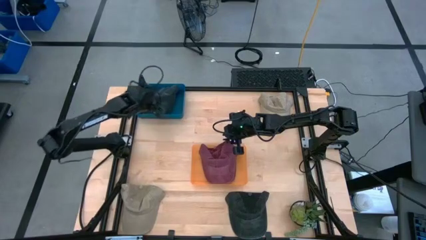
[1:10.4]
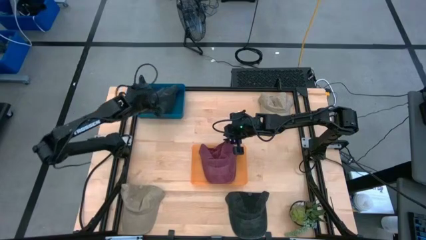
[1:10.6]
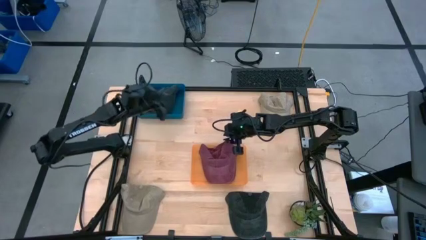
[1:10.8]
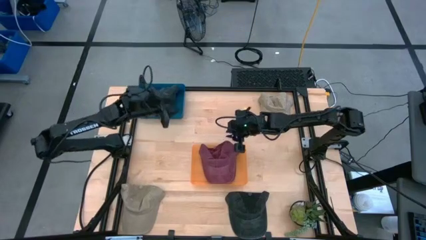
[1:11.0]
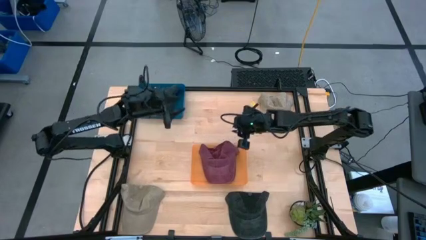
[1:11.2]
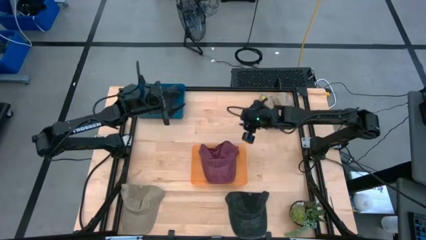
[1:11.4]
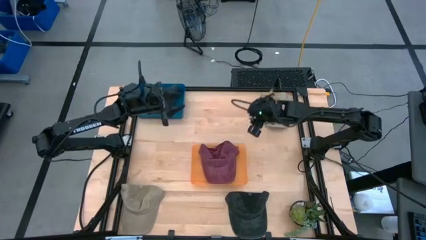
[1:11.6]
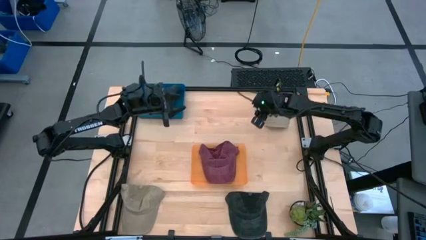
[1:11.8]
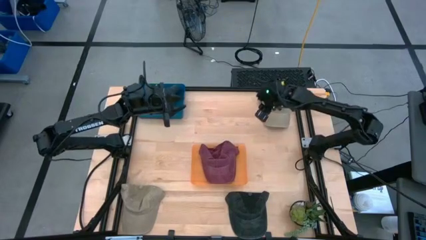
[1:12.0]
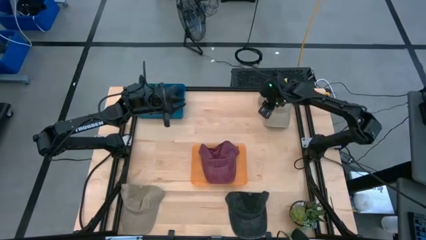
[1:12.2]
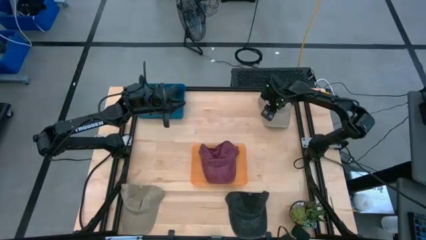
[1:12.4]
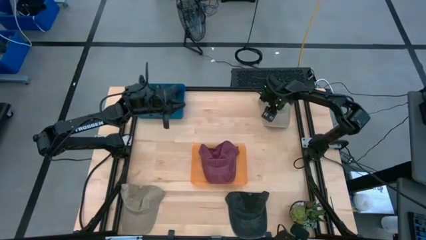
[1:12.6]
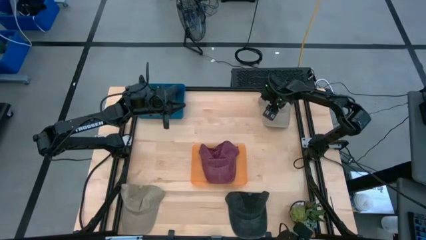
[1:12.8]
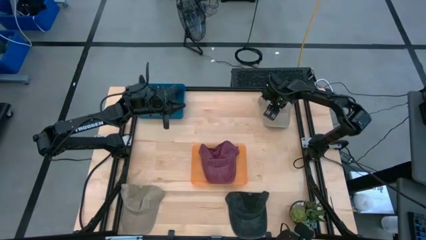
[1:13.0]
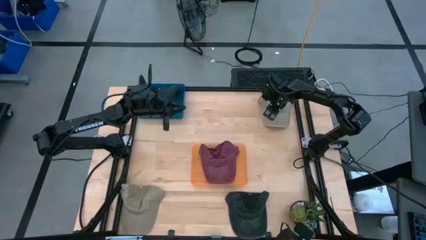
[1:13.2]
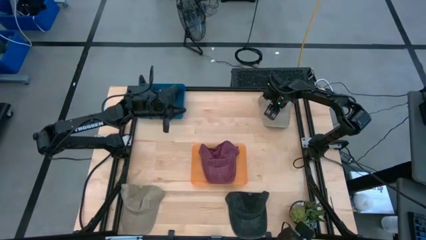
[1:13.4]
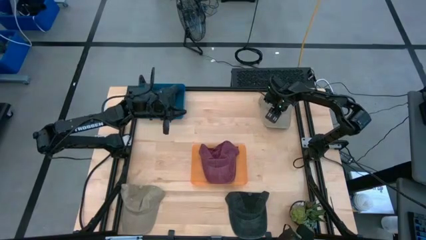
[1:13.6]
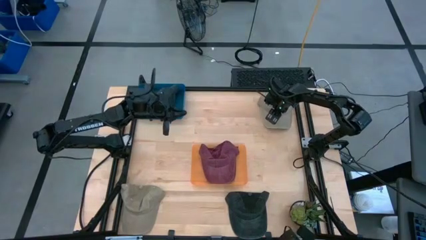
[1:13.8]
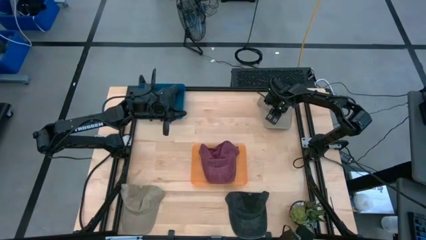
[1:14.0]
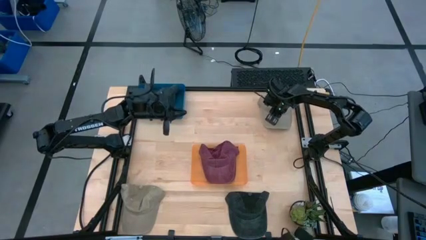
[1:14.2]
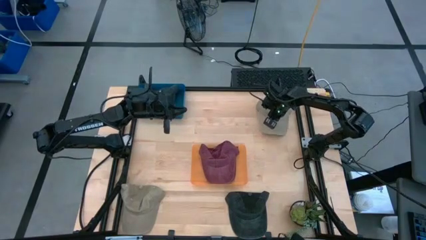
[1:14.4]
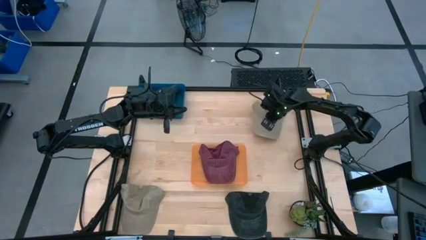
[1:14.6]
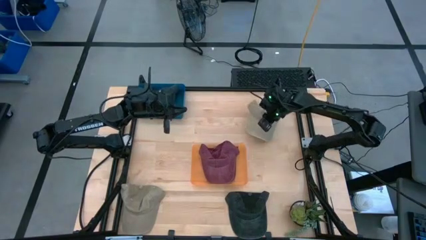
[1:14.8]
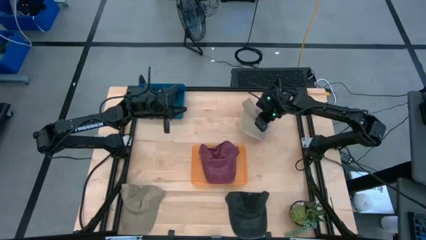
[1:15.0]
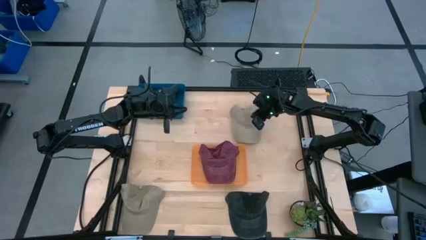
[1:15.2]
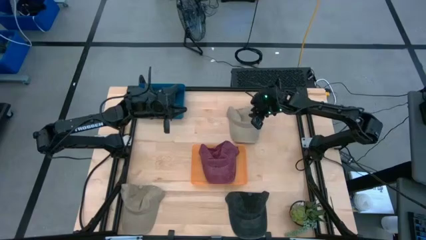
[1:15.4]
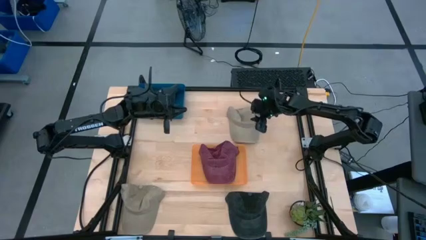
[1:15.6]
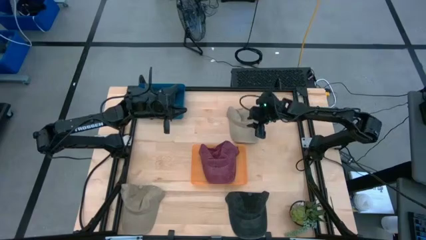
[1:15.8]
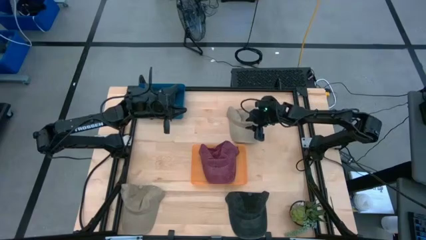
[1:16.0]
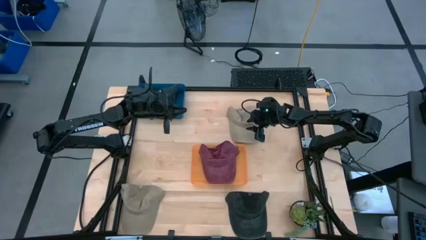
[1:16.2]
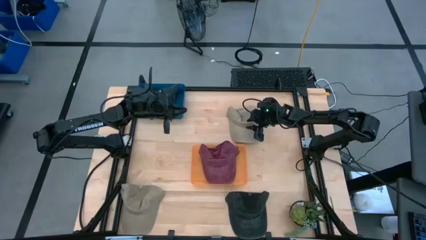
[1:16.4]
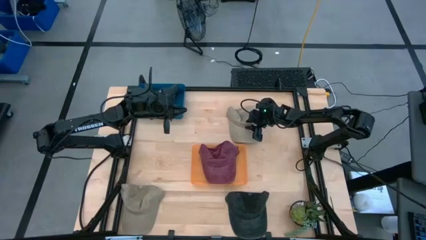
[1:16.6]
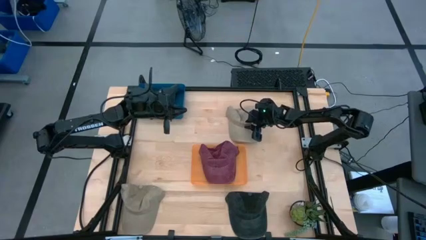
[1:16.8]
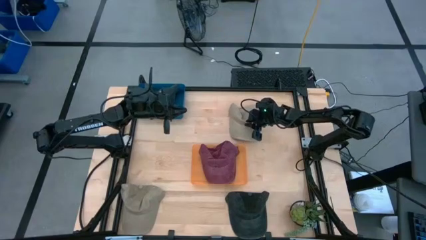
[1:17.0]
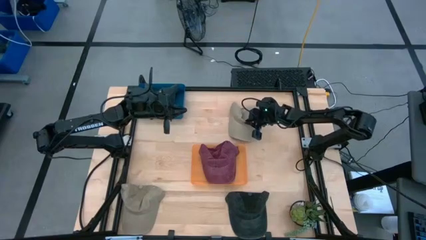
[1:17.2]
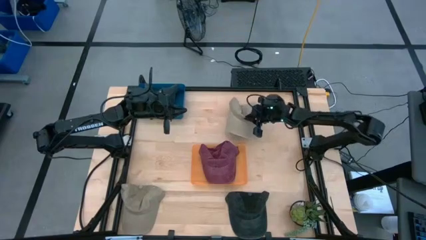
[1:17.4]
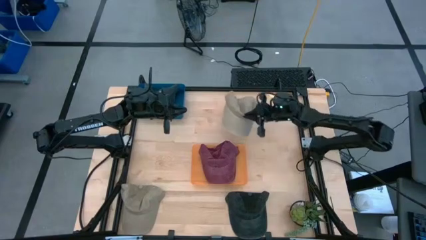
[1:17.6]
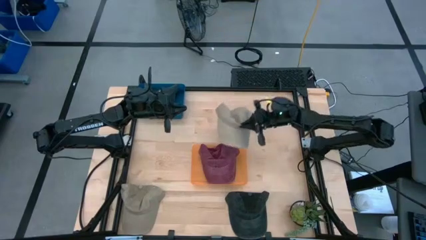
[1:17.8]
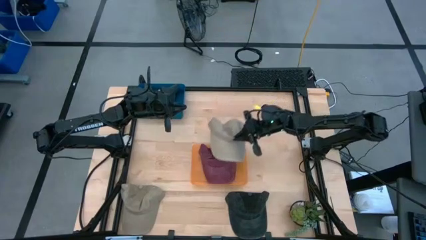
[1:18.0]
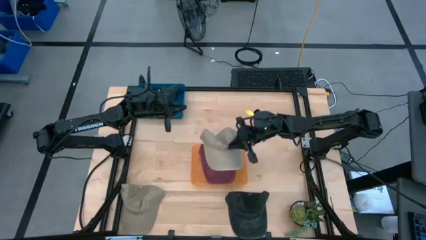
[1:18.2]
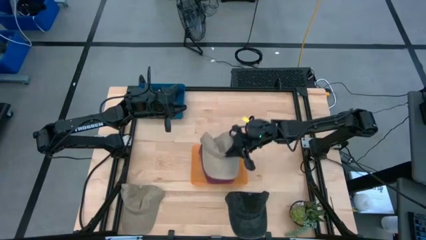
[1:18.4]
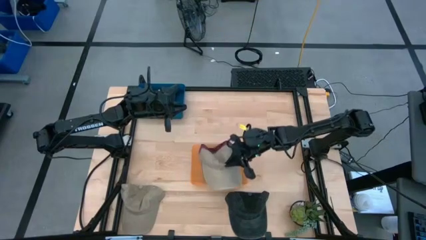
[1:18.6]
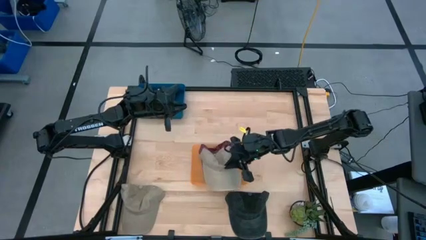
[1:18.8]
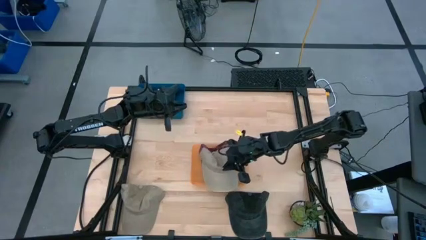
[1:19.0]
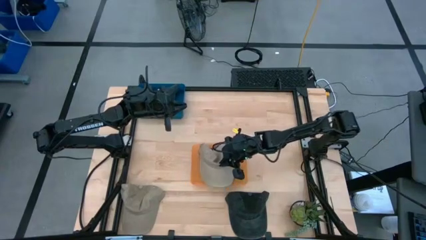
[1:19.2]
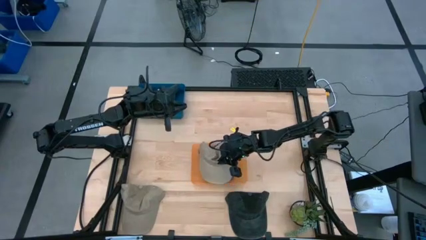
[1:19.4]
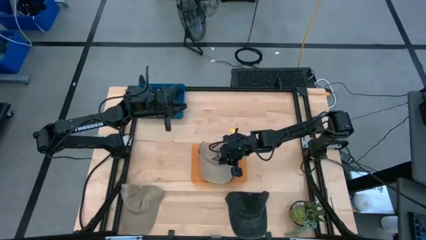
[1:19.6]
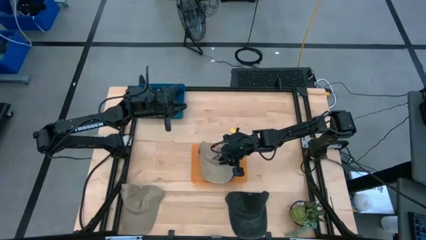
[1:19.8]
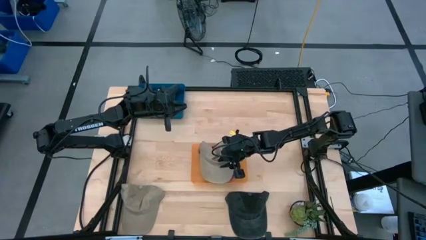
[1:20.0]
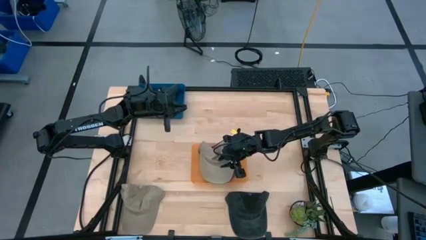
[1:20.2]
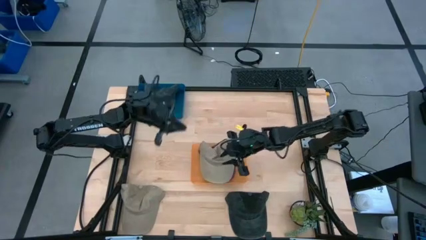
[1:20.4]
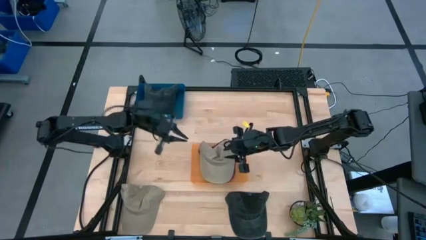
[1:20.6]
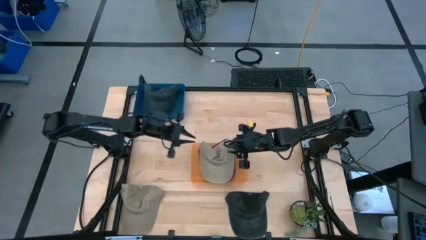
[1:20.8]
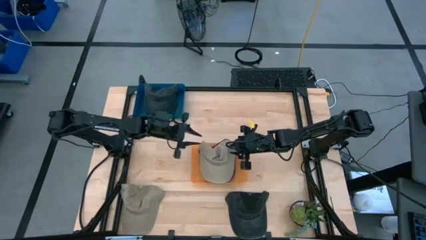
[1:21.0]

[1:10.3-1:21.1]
Task: Pick & Place hat
Put the top brown cap into the orange bin

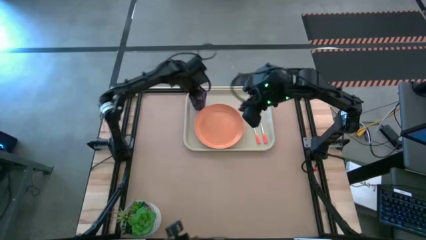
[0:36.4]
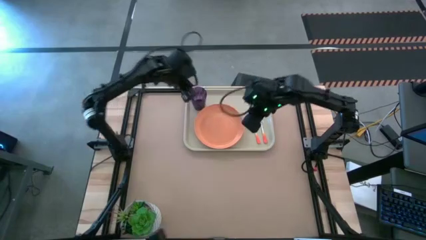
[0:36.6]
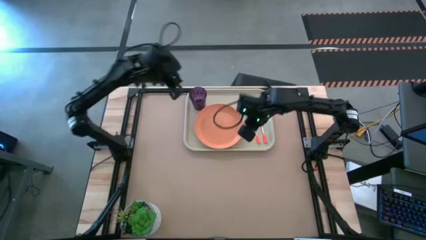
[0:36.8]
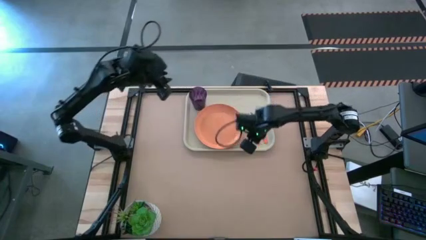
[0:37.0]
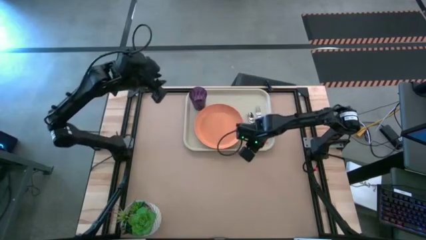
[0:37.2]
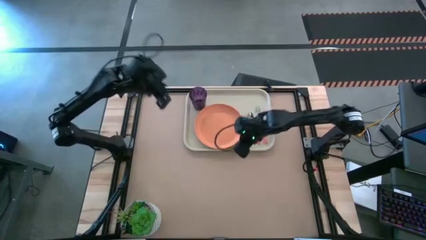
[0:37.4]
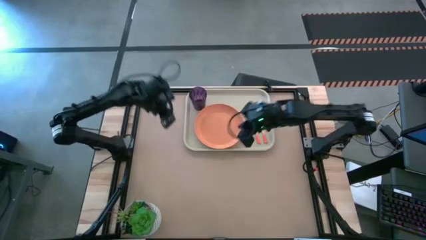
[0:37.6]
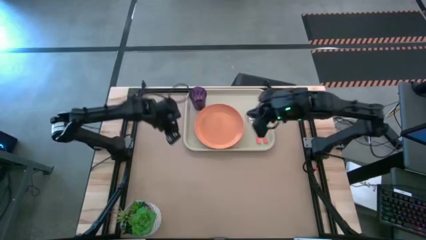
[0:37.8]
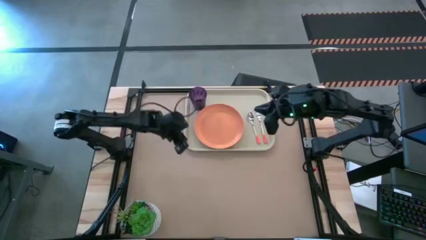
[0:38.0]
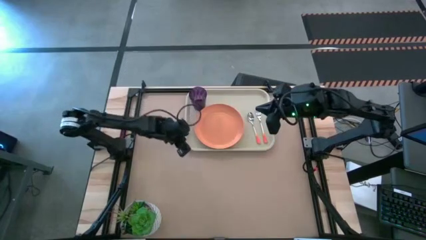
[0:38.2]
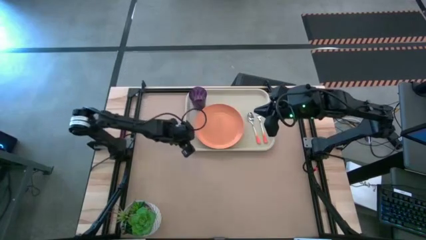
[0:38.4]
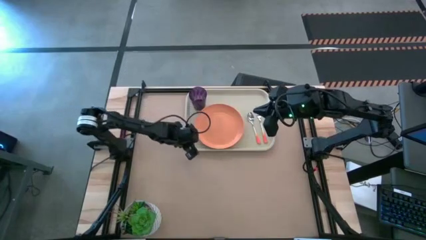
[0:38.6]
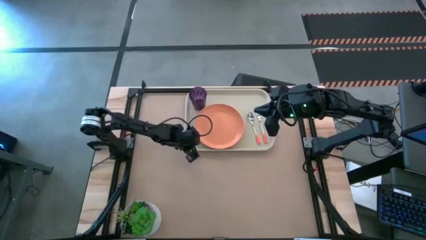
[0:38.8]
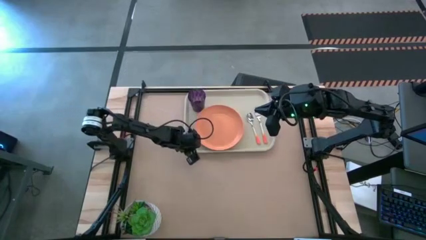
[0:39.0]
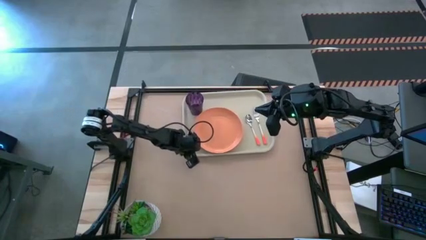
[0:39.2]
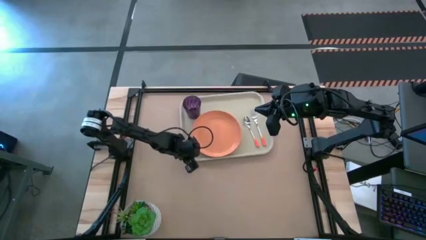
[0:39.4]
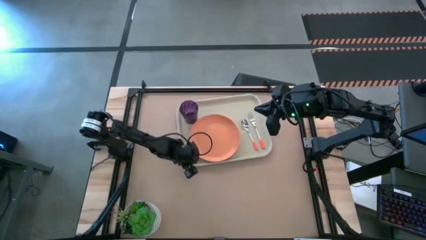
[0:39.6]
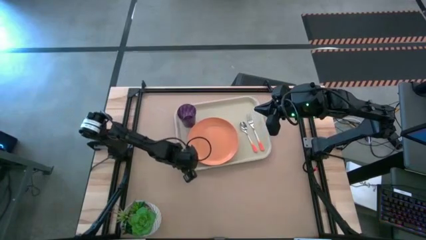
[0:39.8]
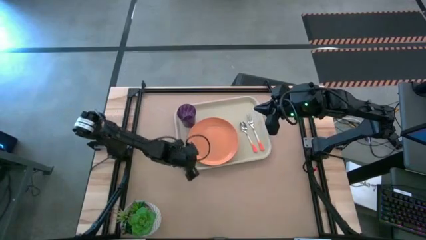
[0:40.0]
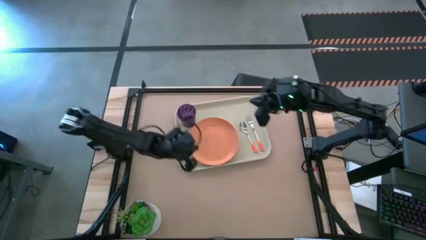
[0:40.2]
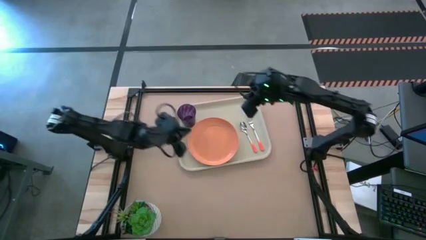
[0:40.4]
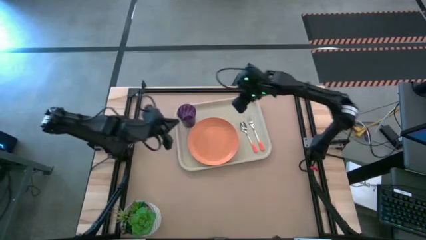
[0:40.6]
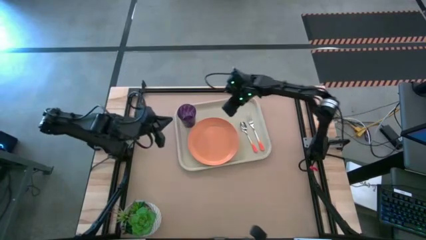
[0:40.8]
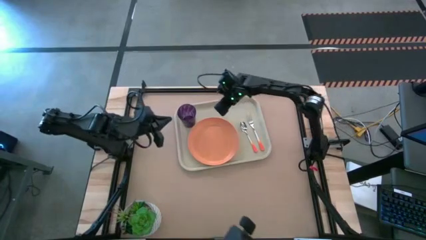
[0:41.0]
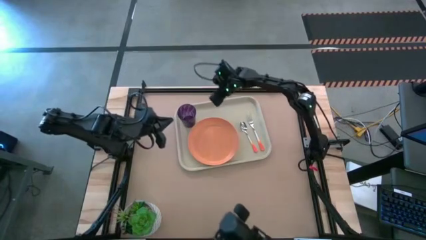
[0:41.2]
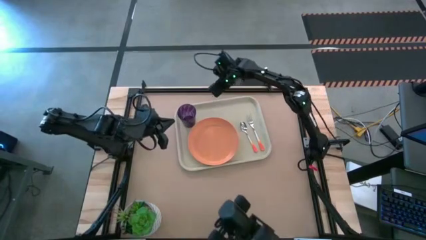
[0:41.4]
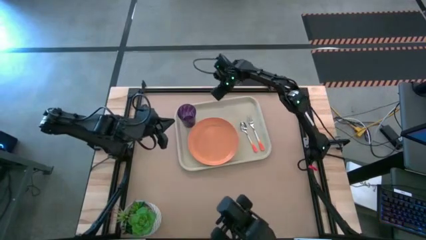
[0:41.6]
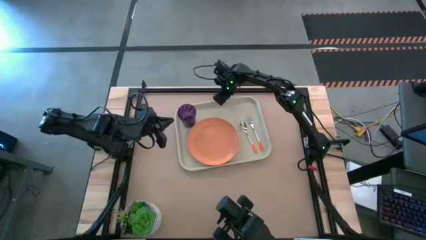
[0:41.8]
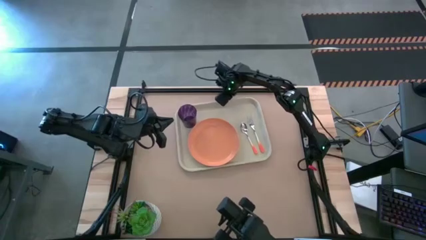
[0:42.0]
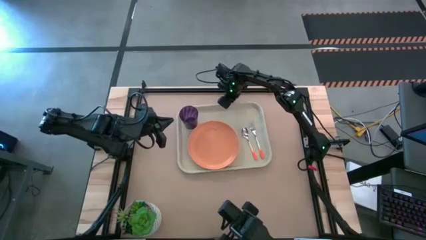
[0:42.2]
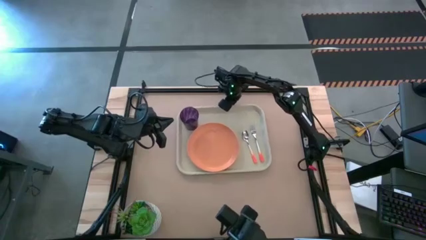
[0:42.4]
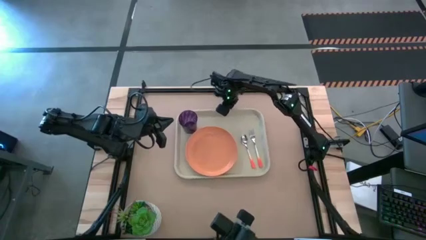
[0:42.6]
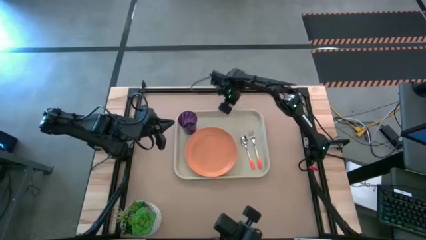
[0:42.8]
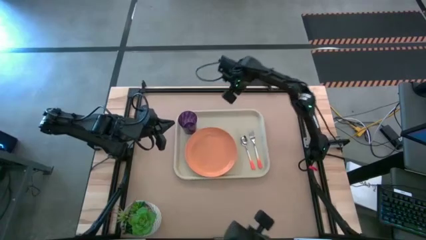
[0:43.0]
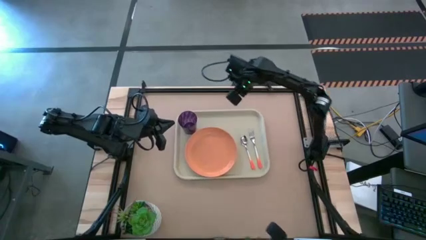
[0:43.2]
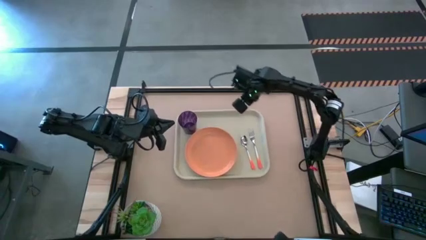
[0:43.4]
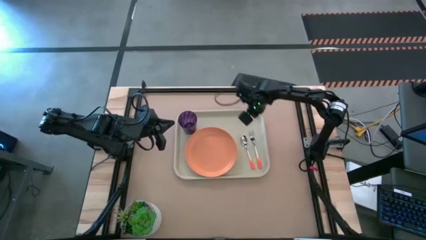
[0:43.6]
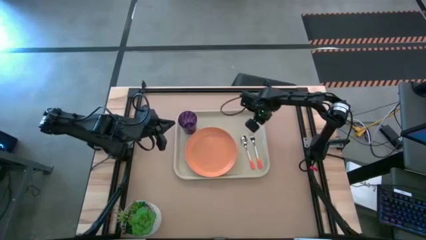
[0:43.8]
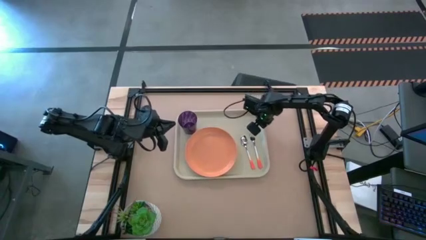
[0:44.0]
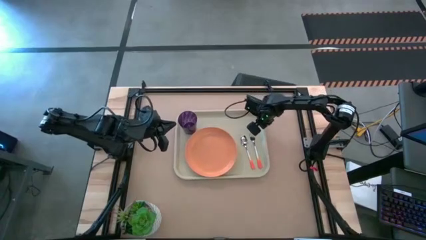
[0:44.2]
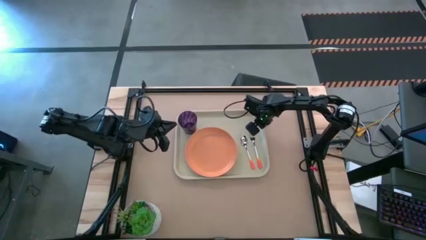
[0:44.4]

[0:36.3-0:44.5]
Task: Pick and place plate/cup/fork/spoon on tray
Move the white tray to the middle of the table
